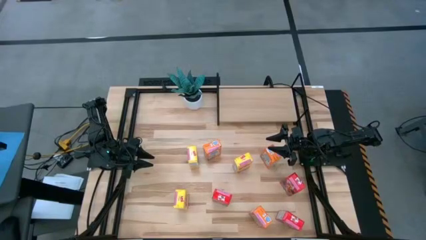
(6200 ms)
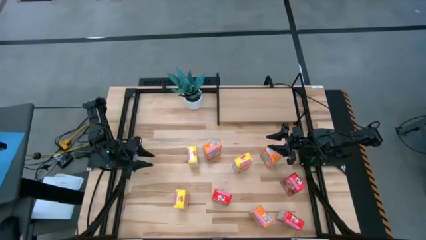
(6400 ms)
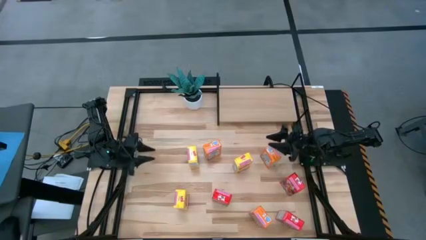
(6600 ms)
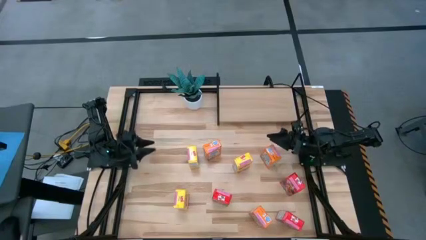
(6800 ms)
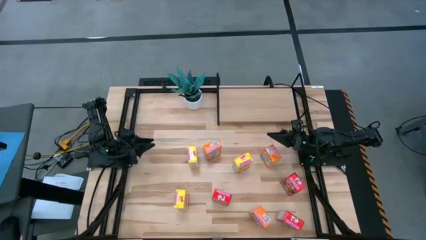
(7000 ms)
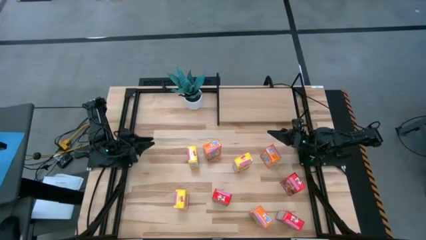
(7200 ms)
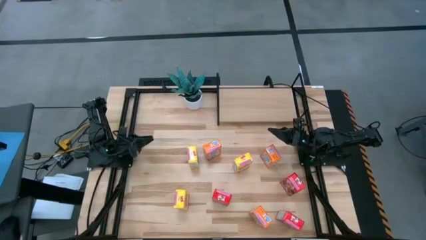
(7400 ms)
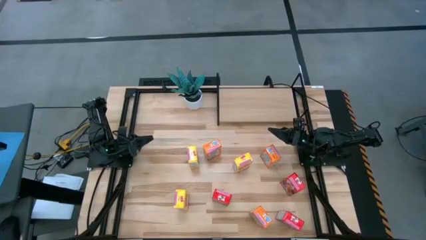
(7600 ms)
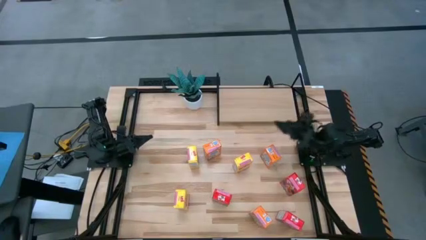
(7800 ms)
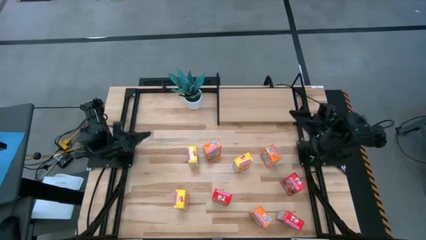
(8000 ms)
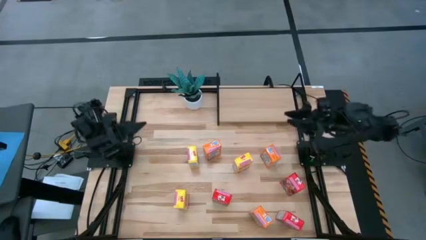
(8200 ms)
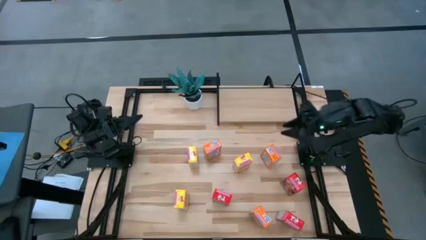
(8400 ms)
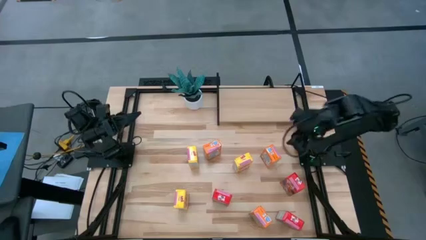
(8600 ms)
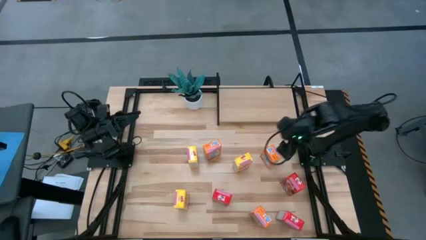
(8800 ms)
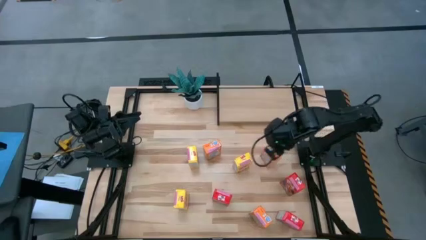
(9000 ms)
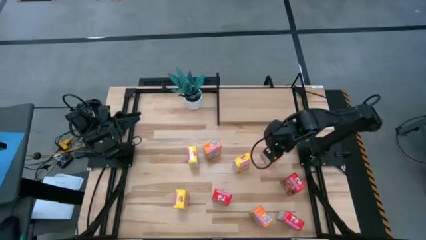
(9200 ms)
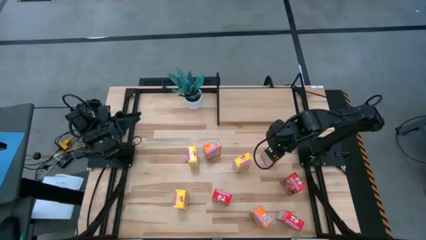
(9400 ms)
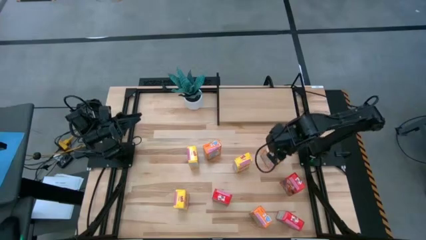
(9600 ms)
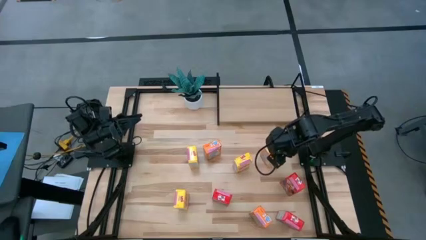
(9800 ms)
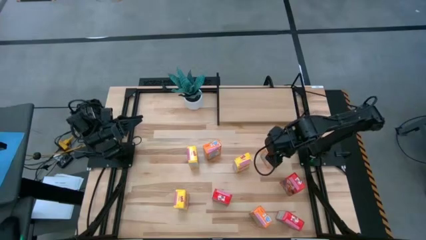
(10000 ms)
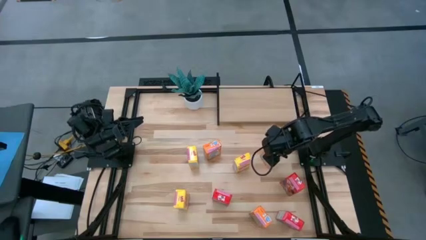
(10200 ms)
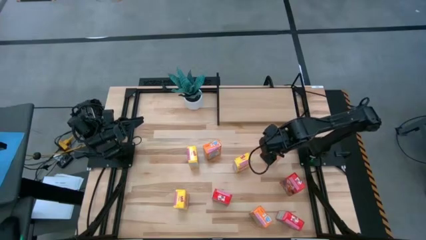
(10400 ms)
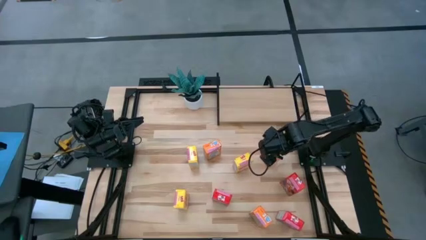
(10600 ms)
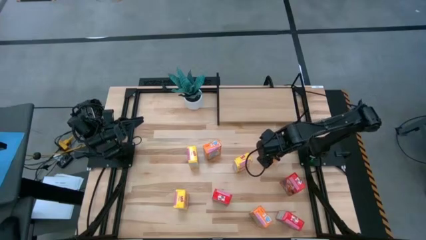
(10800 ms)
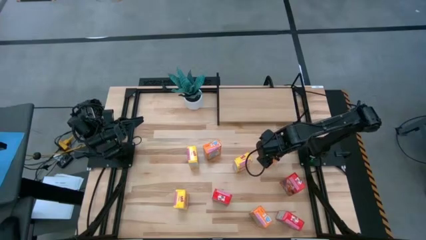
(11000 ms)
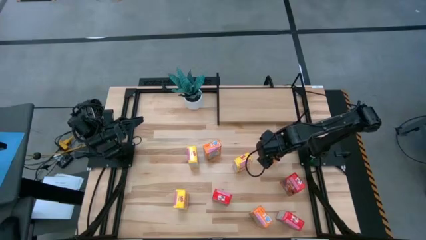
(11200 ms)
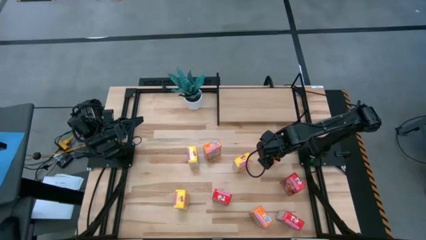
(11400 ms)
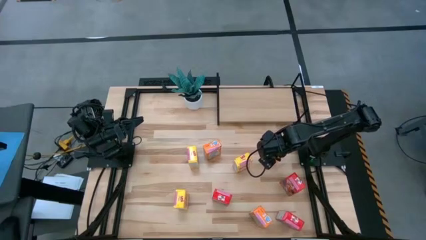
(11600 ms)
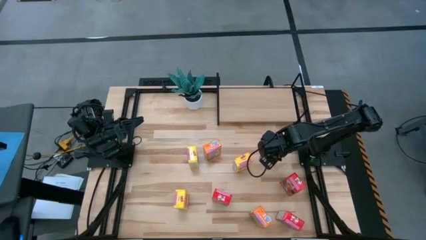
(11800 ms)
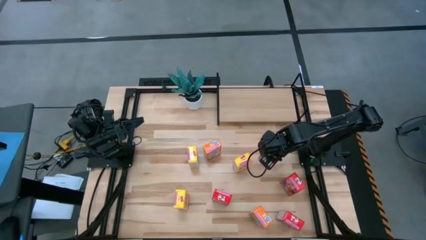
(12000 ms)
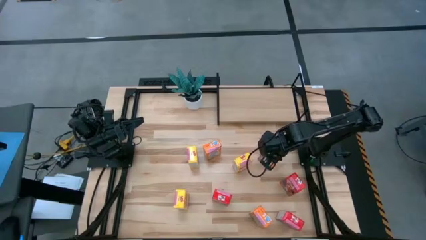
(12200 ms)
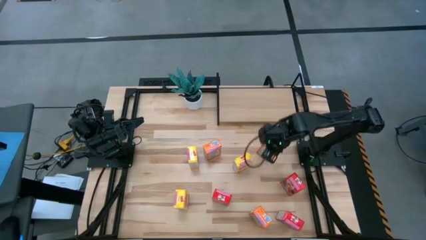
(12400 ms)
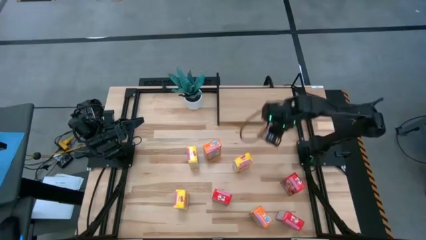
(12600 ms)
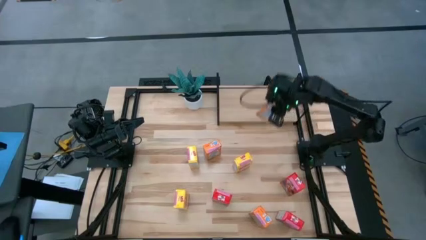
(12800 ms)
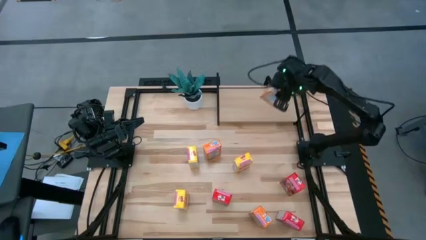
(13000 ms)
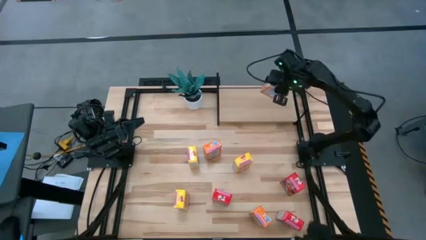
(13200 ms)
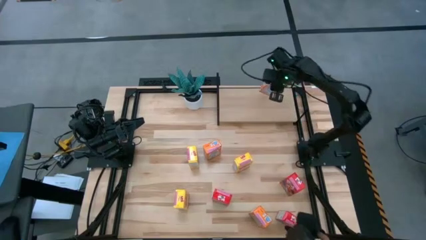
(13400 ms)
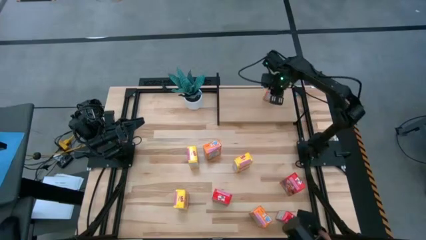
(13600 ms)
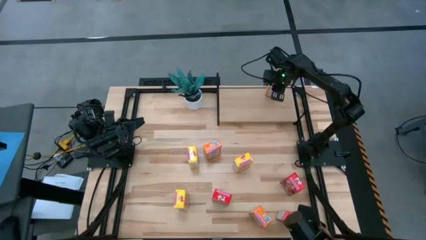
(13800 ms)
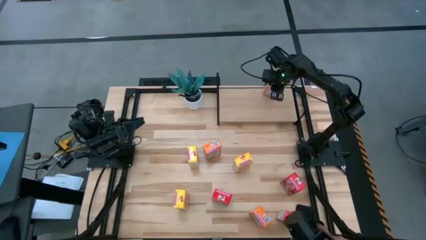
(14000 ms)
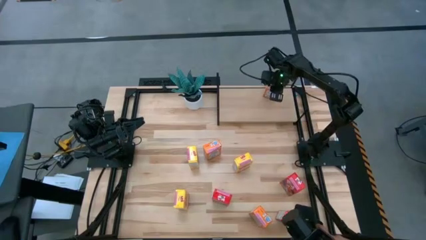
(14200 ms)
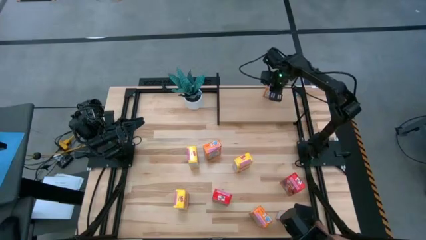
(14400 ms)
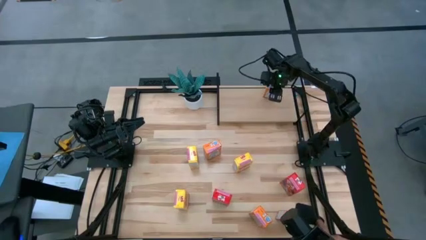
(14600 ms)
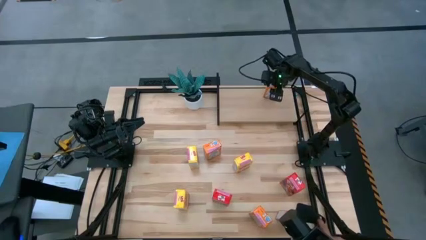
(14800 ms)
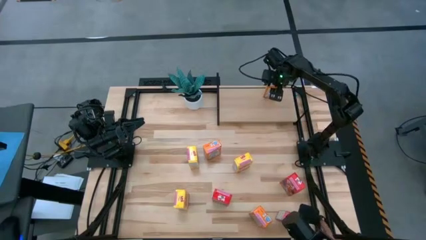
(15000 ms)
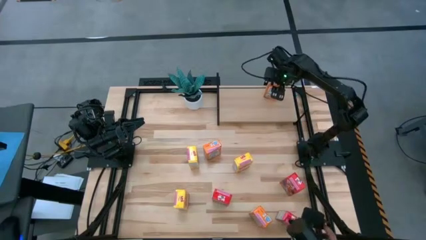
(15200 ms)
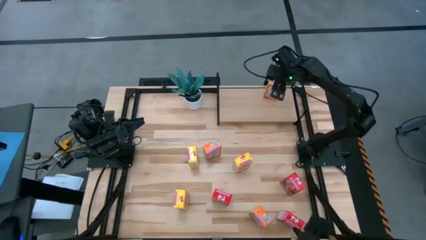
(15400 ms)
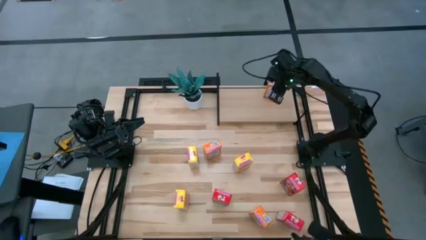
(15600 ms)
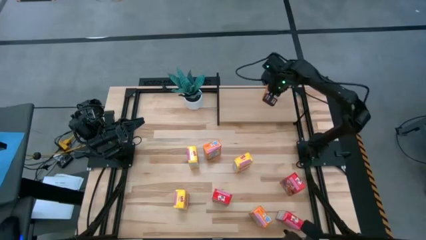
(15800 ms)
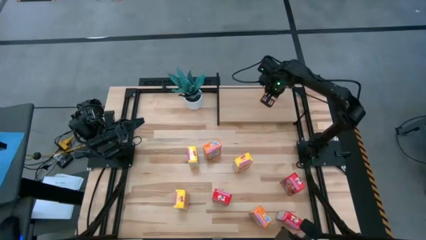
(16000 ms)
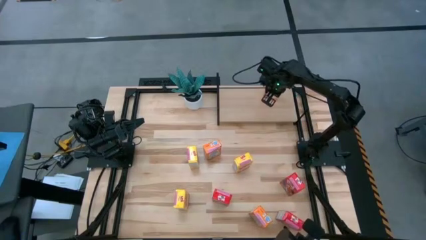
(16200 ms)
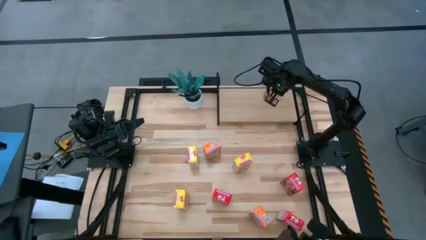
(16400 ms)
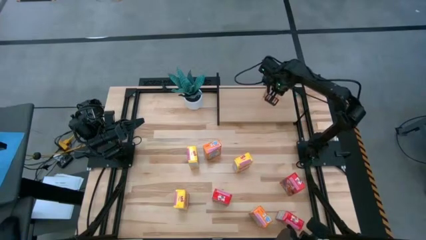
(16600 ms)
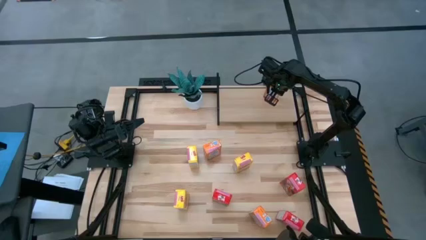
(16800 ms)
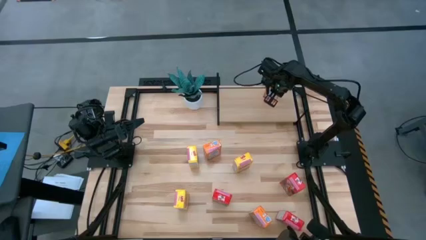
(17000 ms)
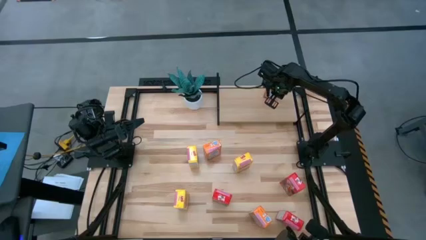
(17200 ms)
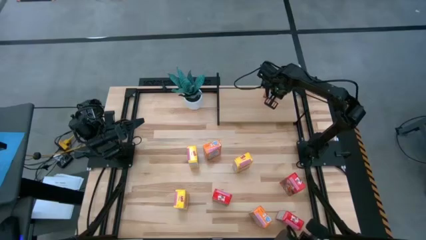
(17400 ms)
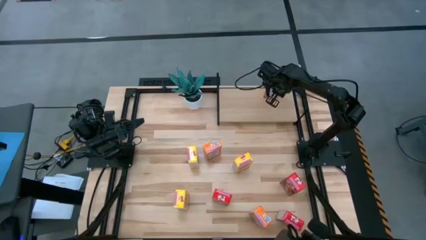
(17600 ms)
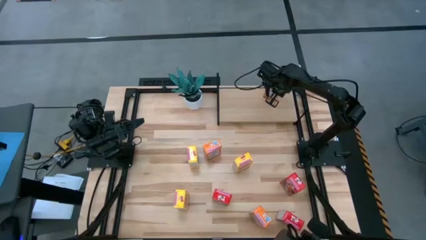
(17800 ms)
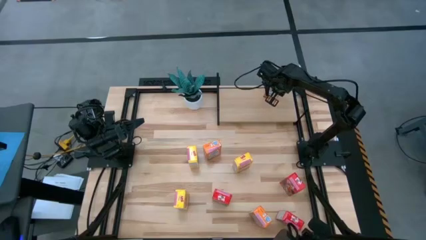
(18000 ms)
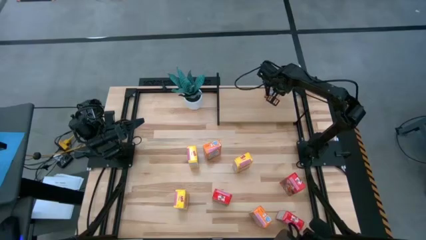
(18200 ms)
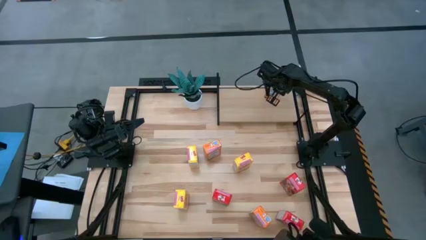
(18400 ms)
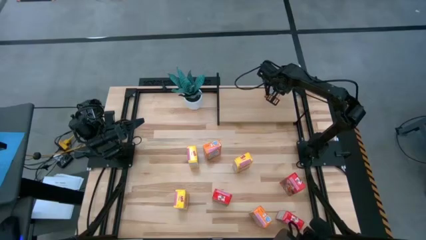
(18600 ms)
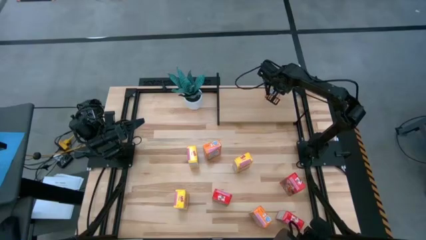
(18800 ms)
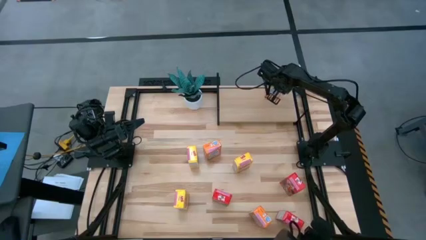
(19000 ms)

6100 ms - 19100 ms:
Task: Stack cereal on shelf
Put the top right orange cereal box on the shelf
